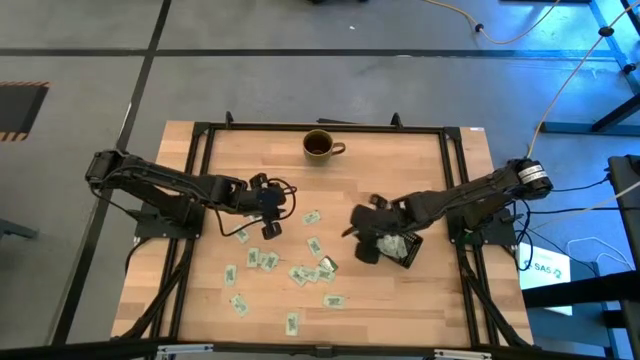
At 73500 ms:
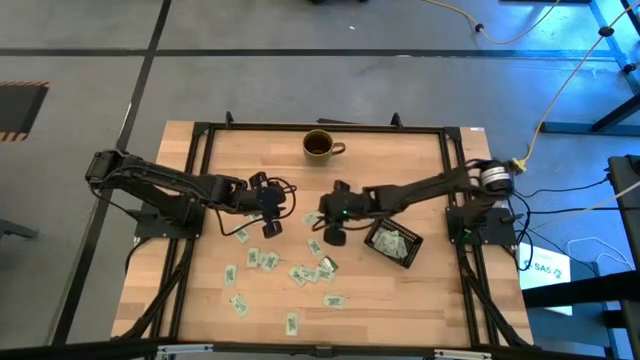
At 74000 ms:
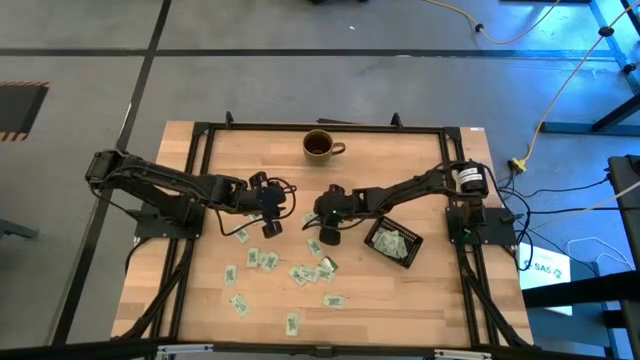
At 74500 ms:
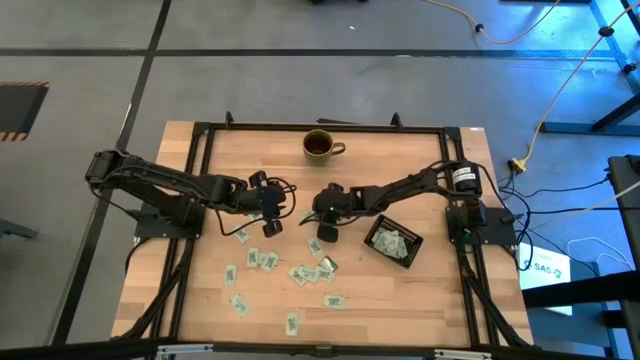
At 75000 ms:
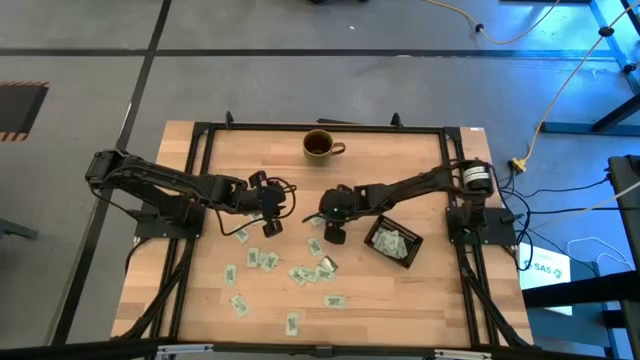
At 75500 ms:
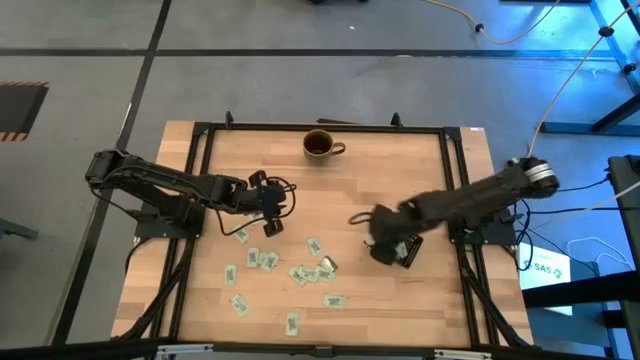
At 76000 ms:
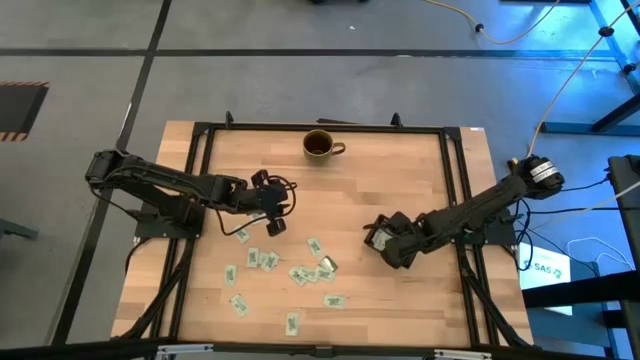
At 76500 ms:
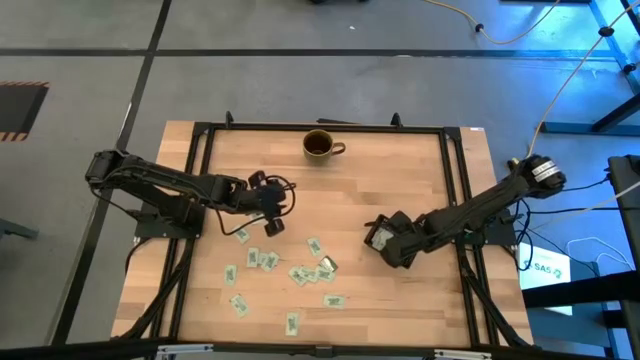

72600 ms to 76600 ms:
Task: Pick and place Stevia / Truvia into bins
Put the stevia packet into the black bin

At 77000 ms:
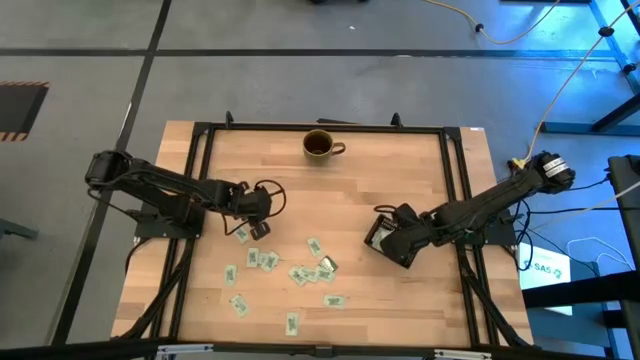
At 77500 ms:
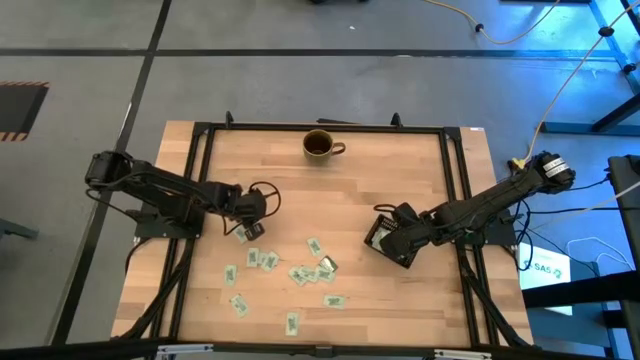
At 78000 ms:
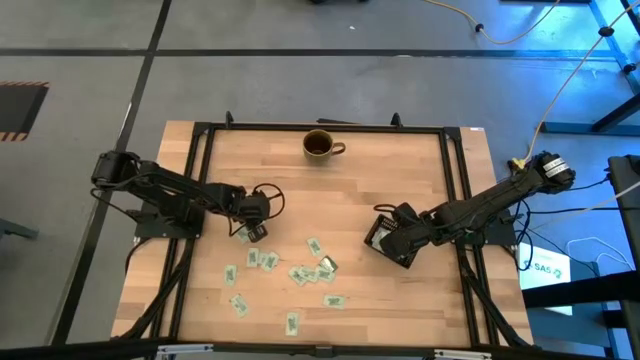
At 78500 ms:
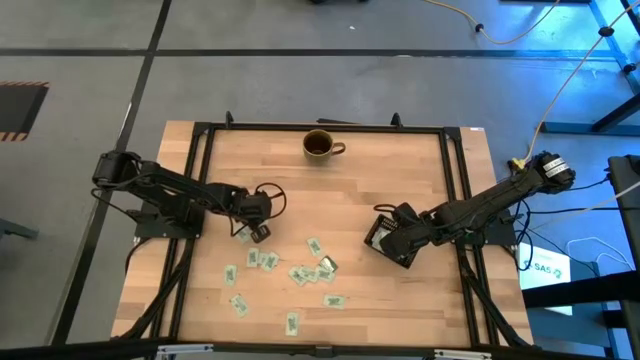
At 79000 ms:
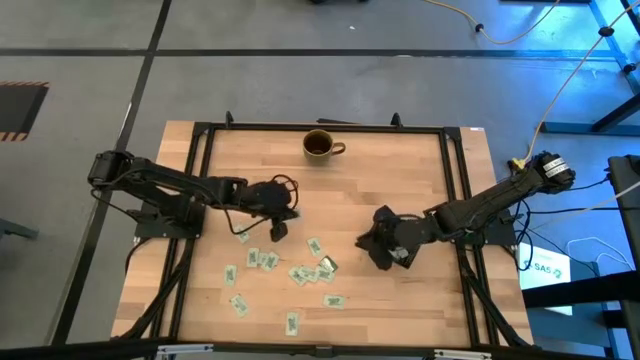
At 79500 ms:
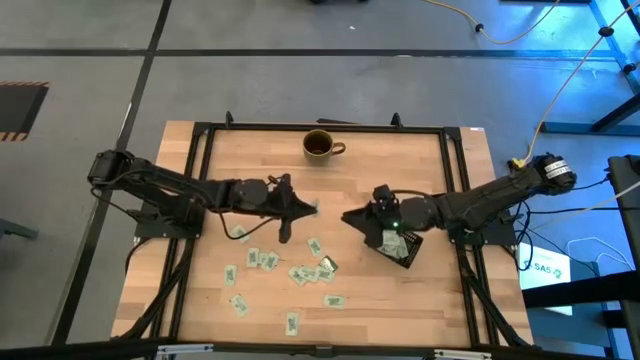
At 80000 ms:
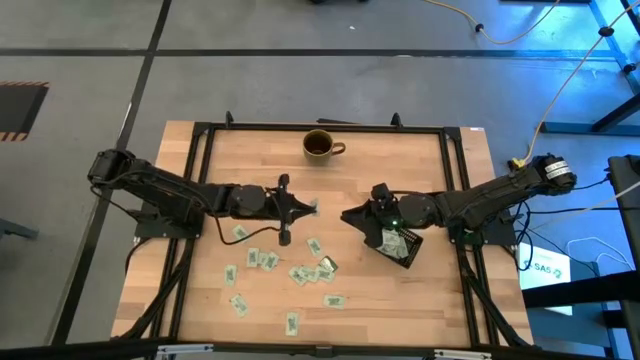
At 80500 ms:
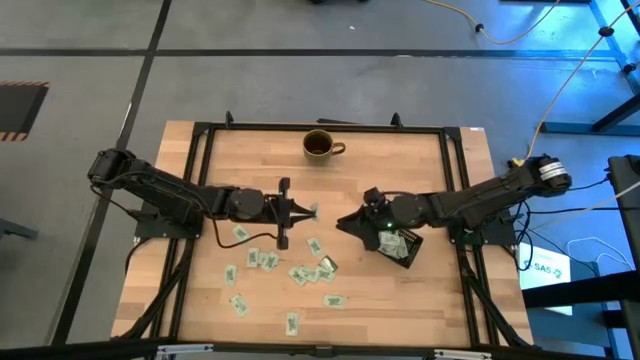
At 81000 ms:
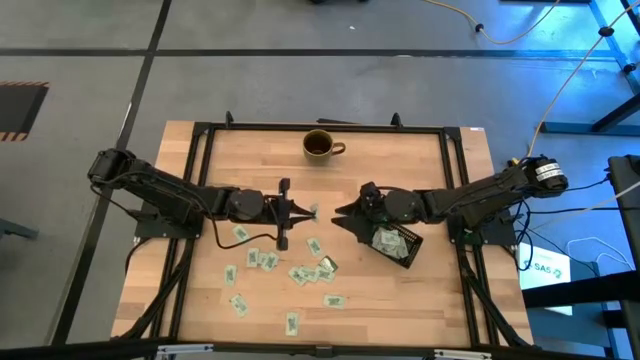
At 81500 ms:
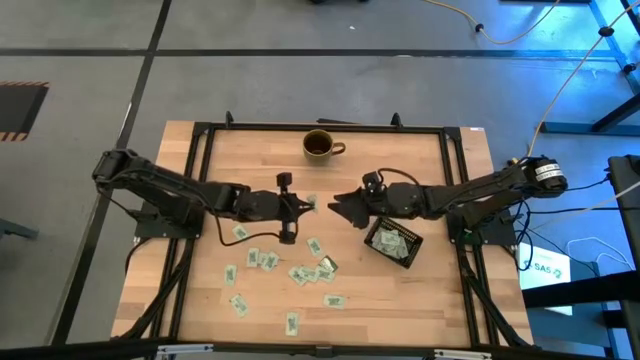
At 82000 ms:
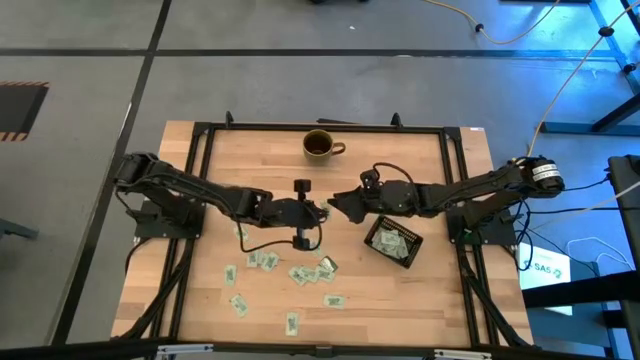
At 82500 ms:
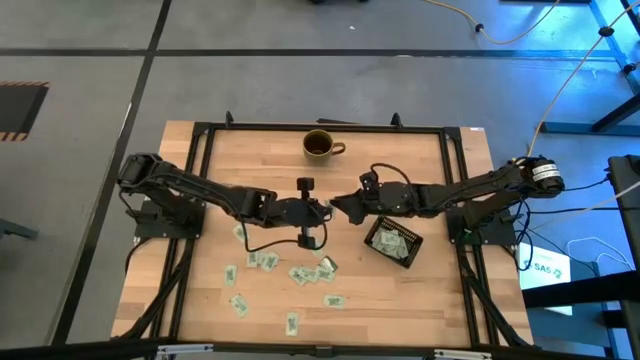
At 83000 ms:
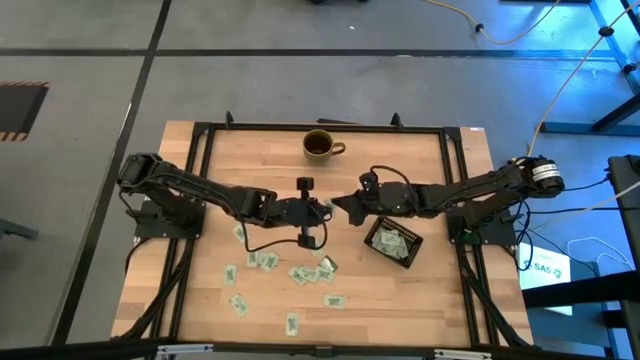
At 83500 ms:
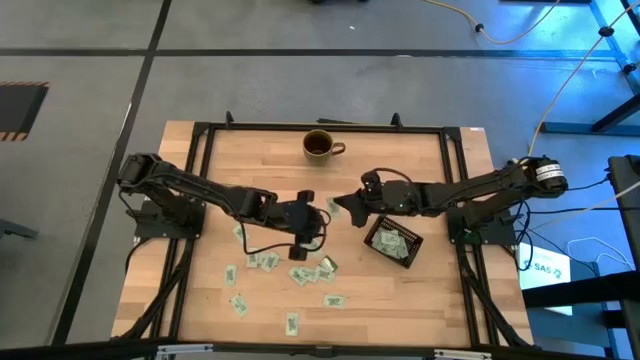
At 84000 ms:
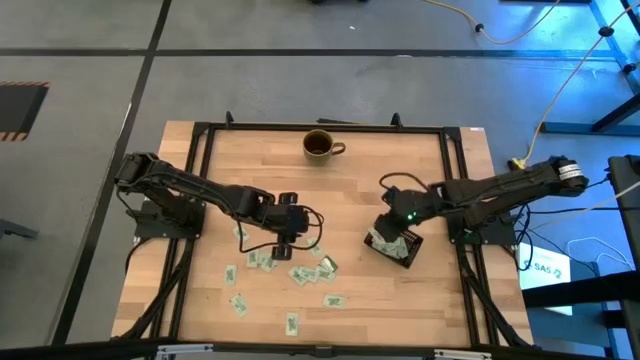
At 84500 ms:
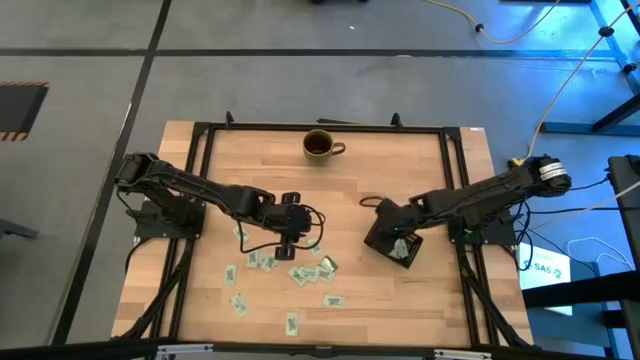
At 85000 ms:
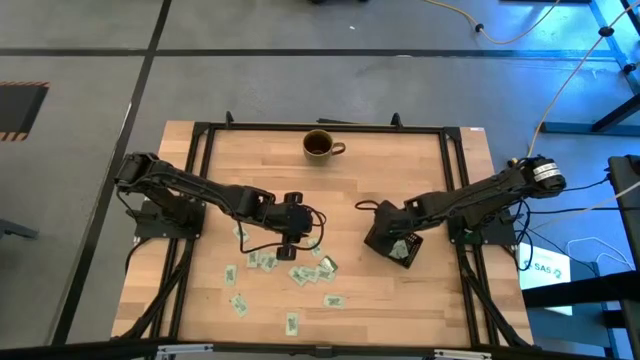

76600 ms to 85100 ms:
Put the stevia packet into the black bin

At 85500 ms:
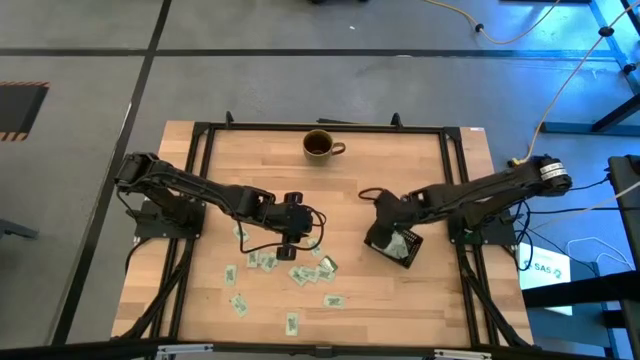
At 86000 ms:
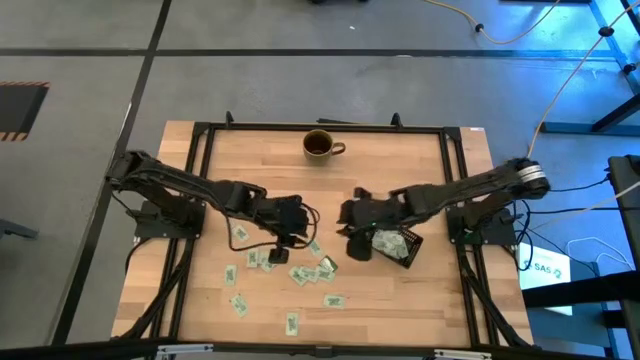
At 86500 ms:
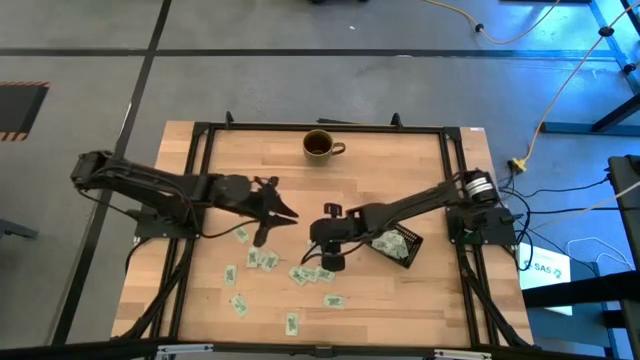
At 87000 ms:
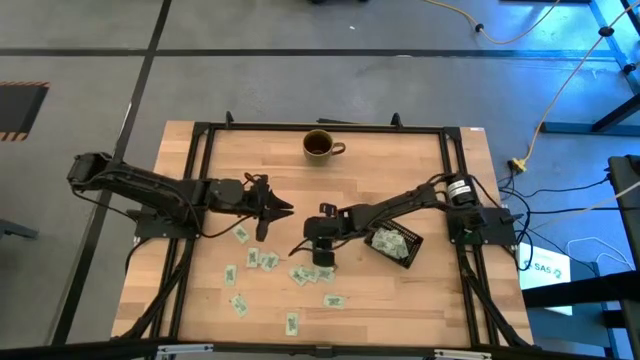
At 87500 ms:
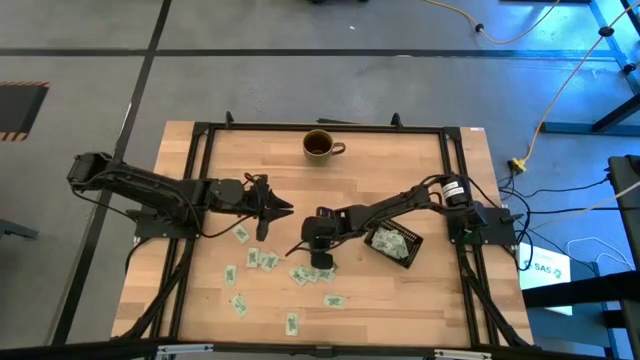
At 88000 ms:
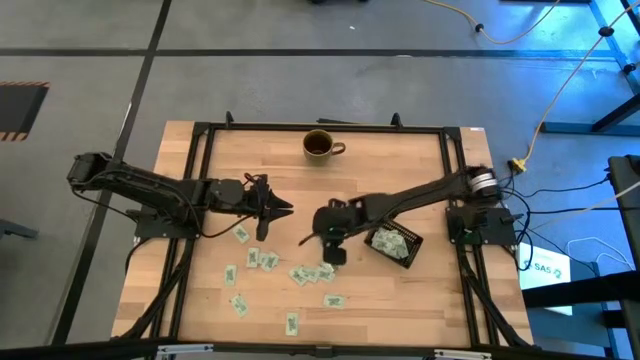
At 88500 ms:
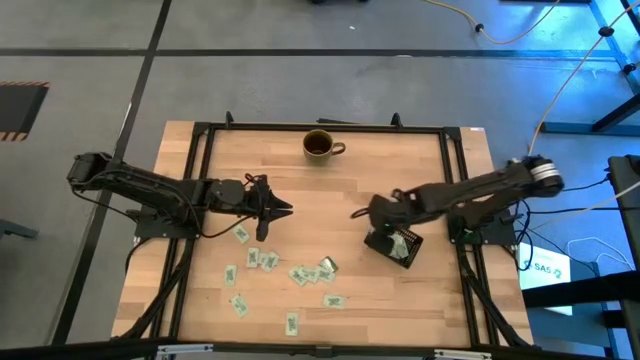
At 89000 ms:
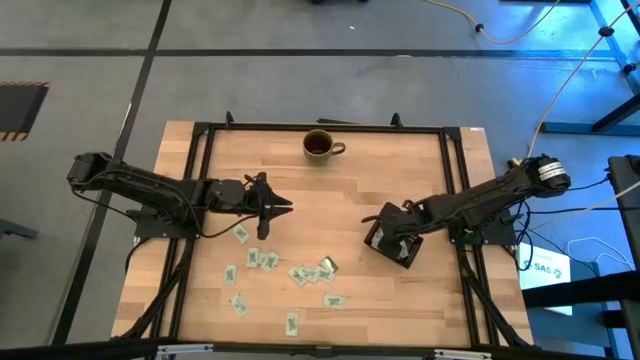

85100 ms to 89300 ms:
Put the stevia packet into the black bin

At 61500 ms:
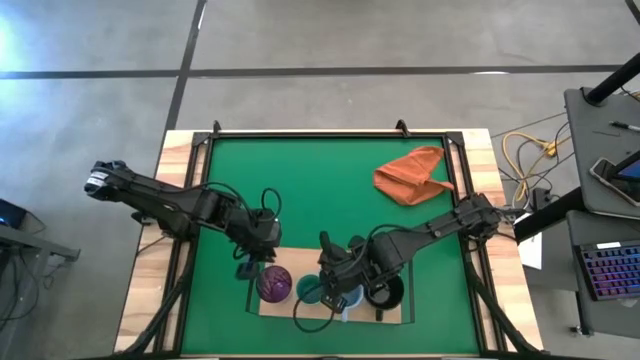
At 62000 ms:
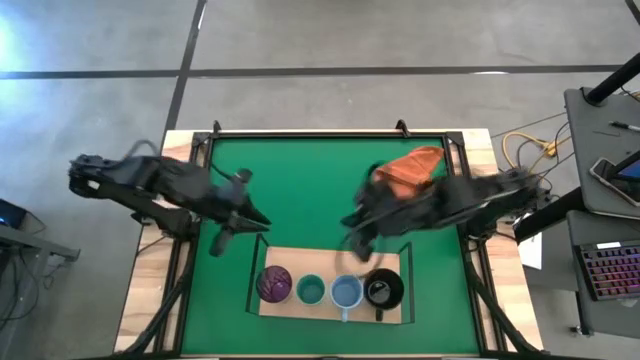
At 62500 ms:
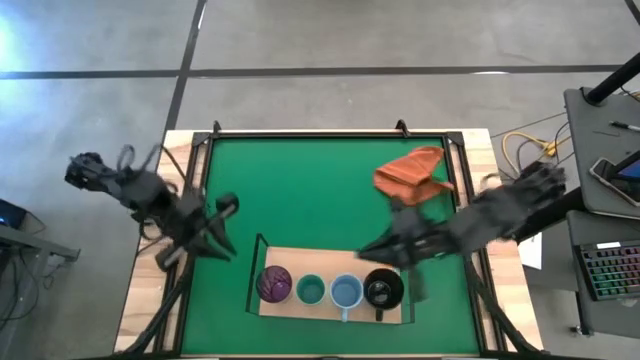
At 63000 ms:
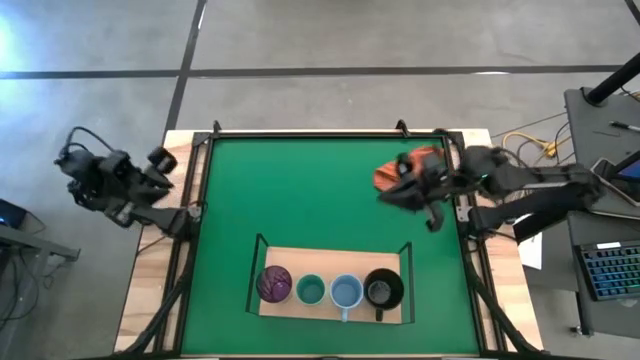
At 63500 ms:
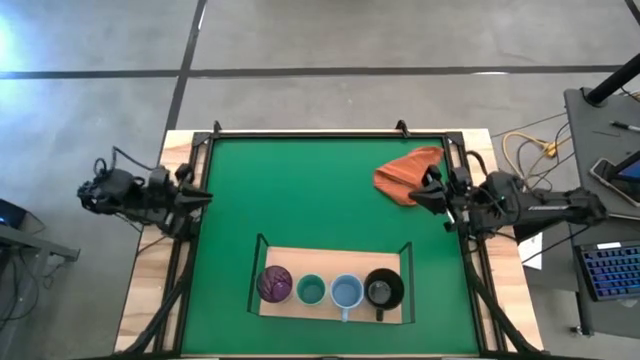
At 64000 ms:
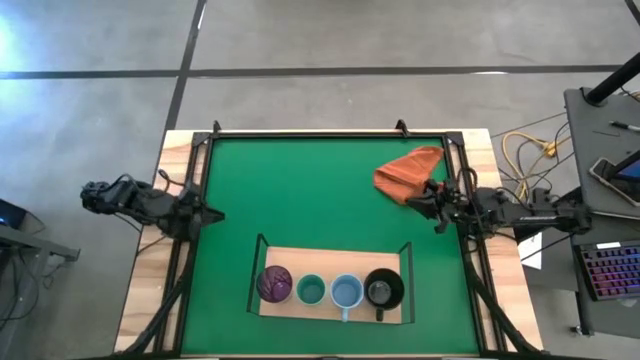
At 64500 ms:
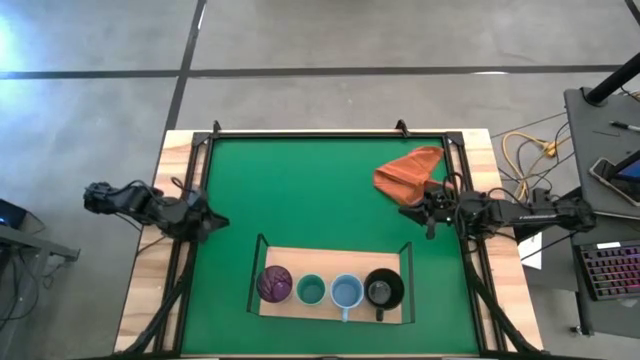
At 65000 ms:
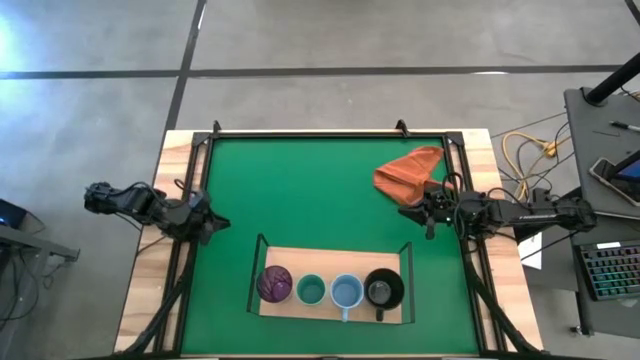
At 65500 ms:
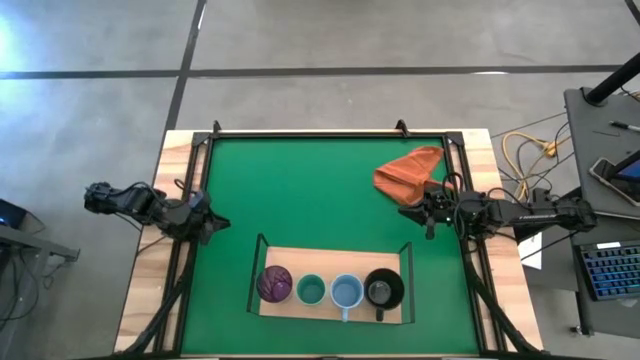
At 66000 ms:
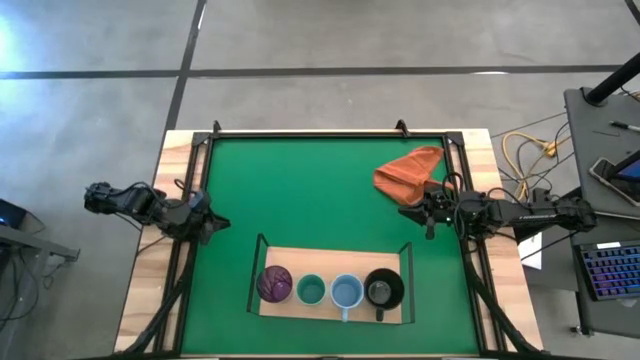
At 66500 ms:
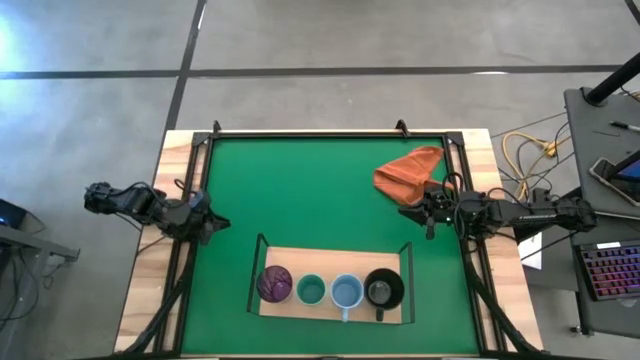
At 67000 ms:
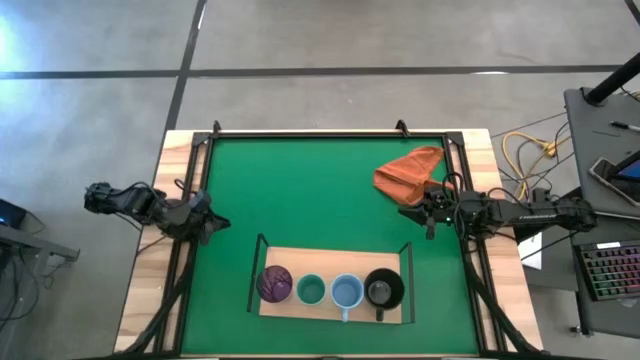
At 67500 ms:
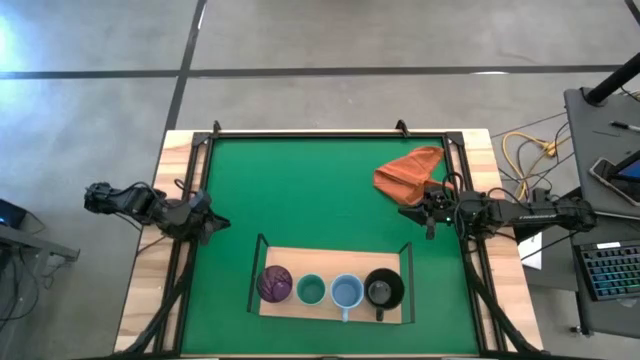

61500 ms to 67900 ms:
Task: Stack small to large cups/mugs on shelf
Return to Home Position
